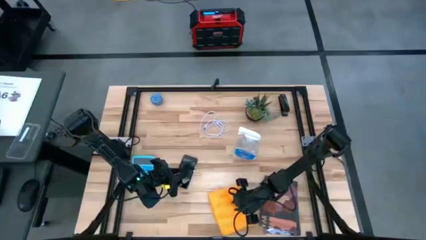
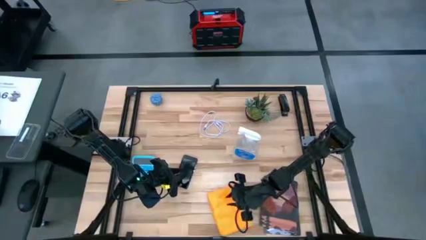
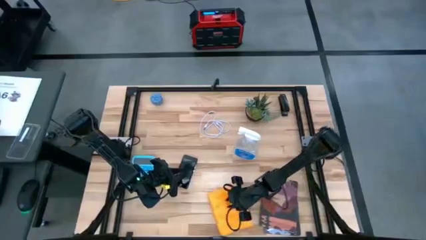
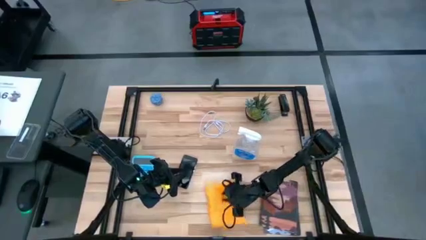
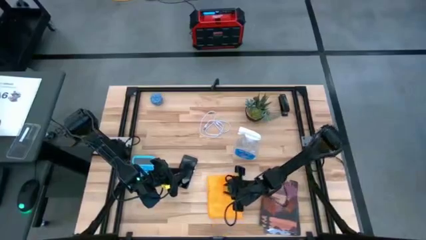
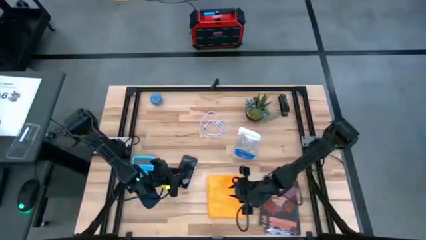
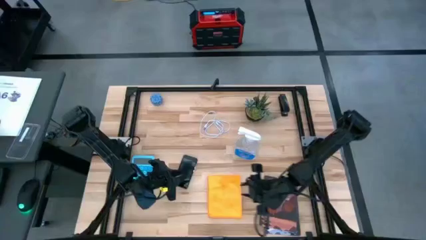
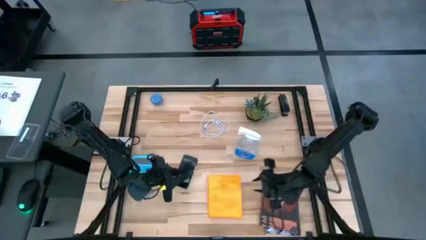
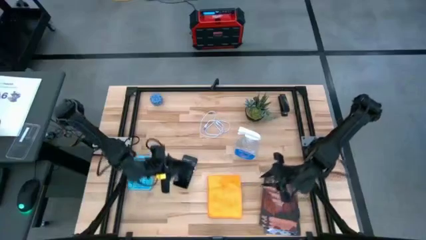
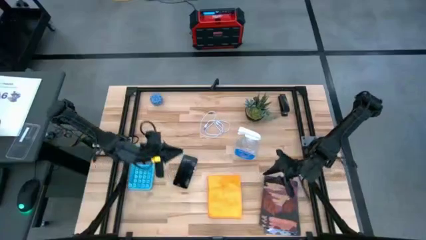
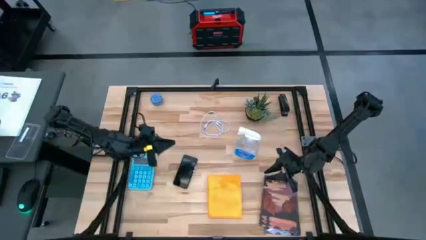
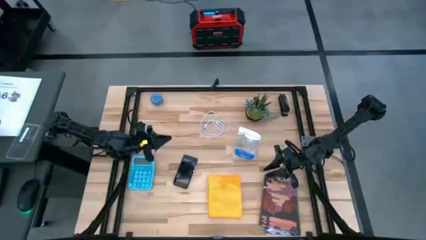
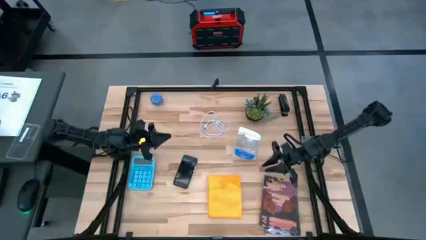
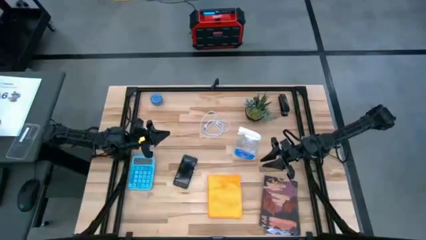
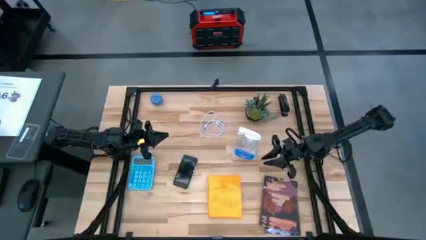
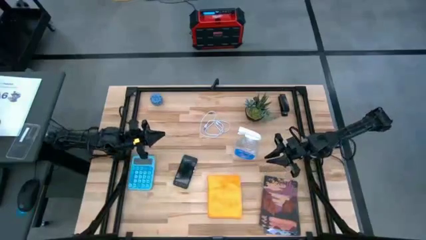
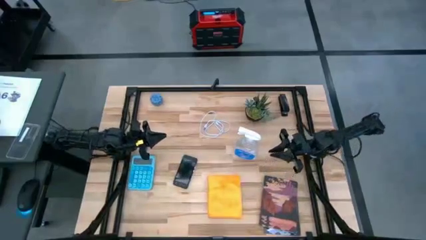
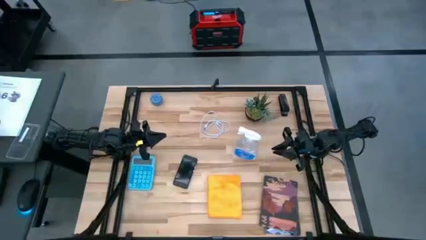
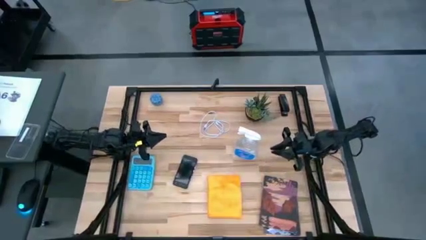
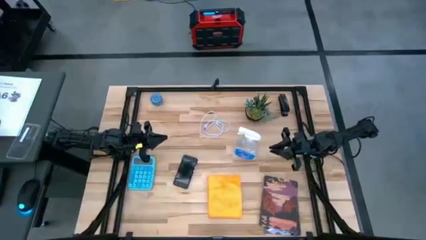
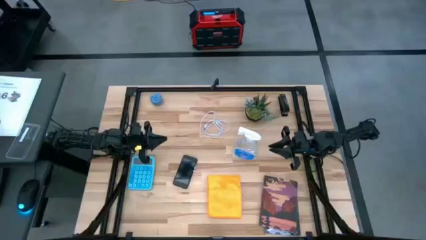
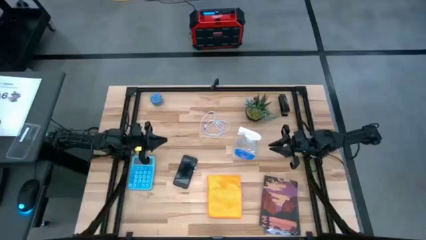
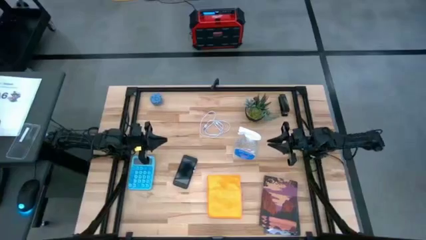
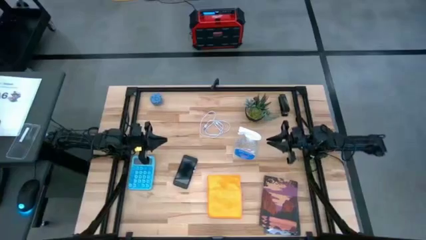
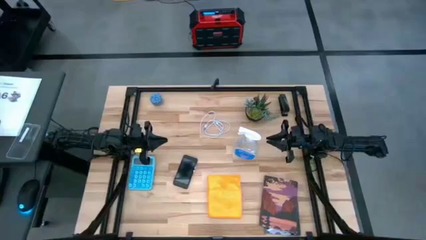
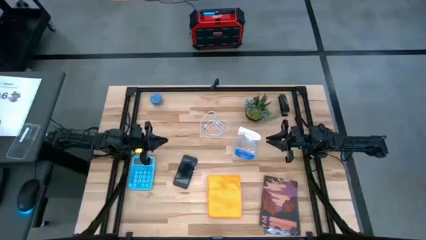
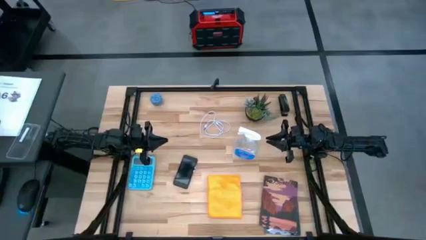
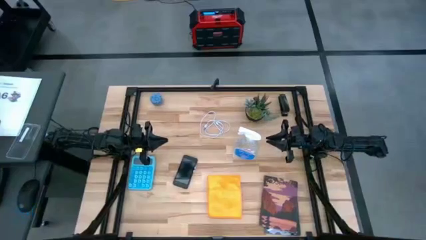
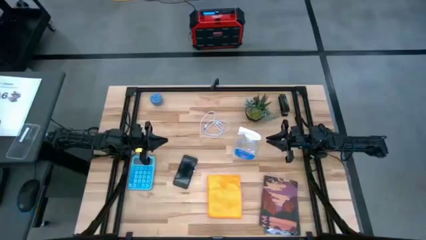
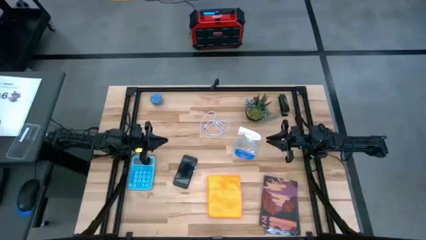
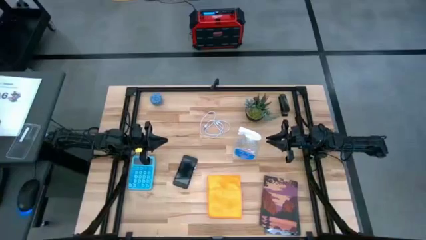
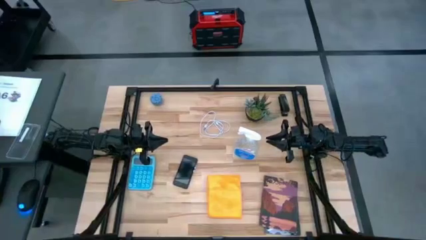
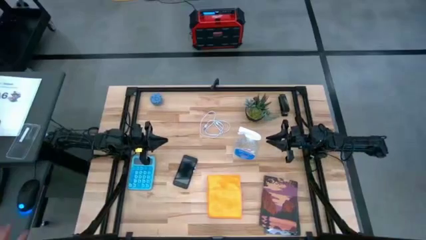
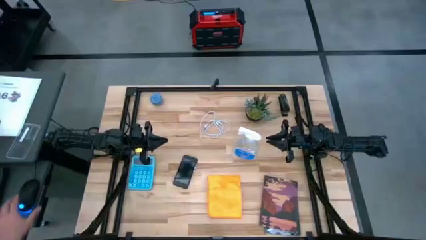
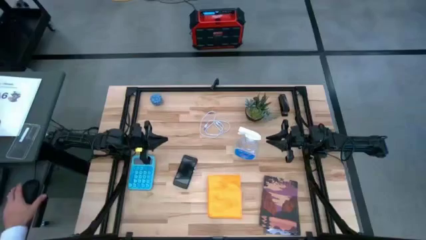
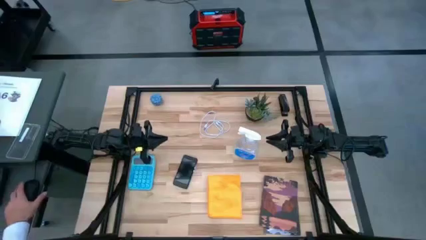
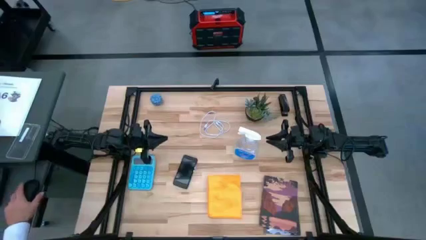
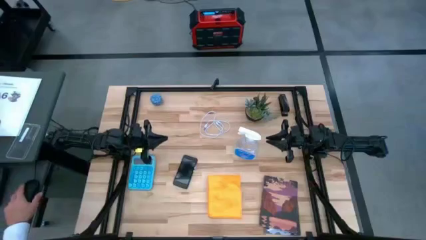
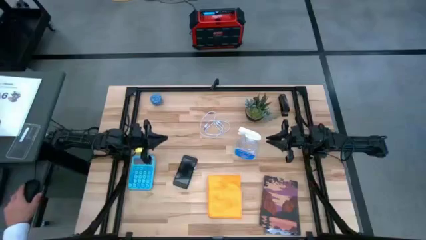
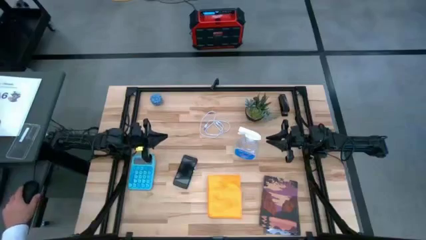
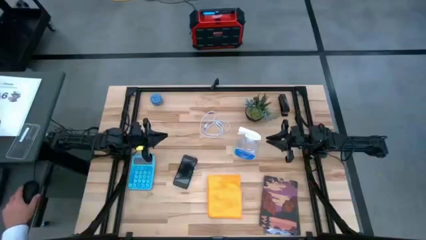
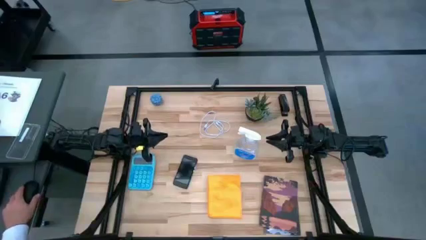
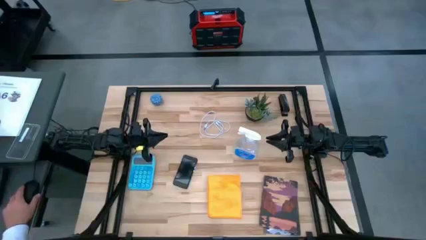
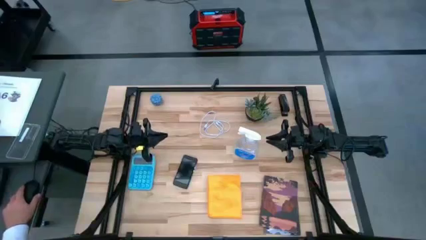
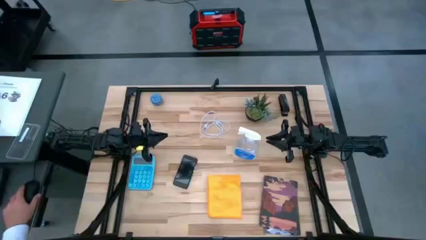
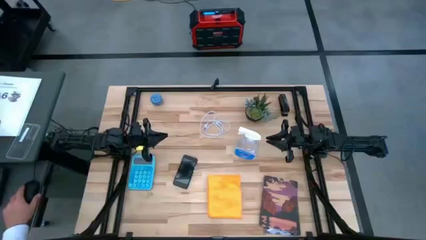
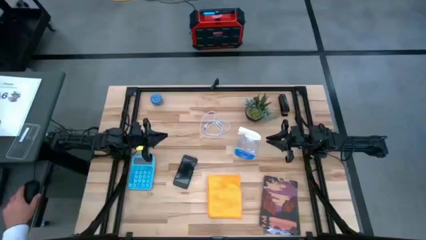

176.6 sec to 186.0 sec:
Task: Apply microfiber cloth
Return to Home Position

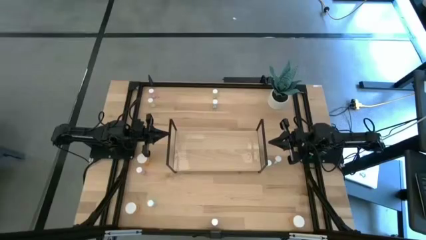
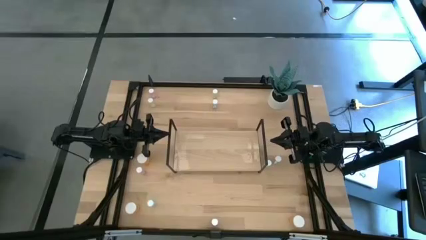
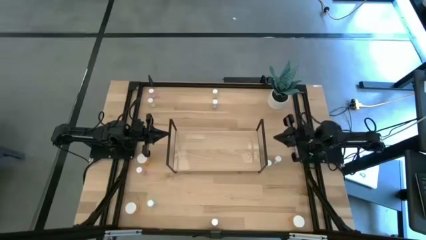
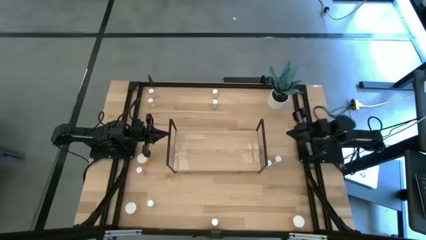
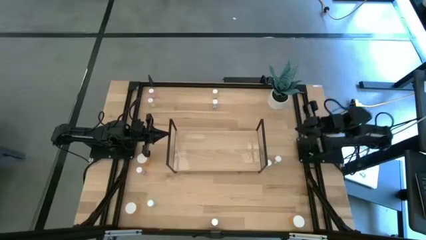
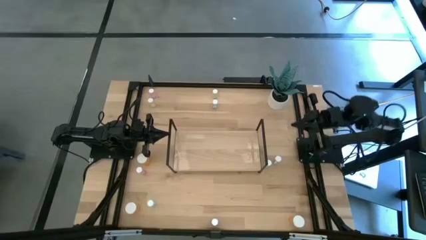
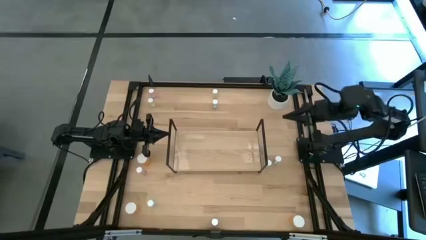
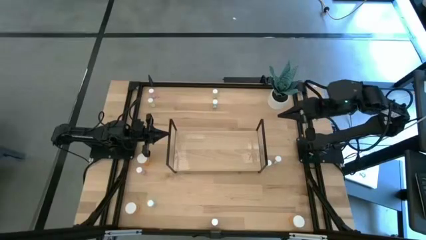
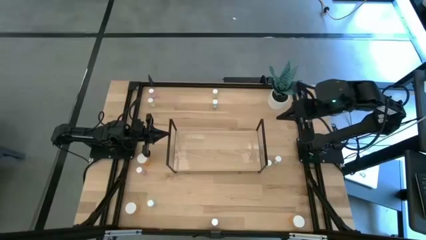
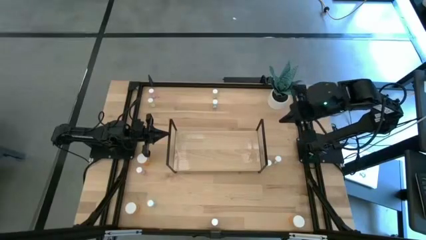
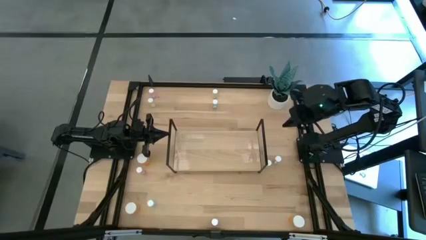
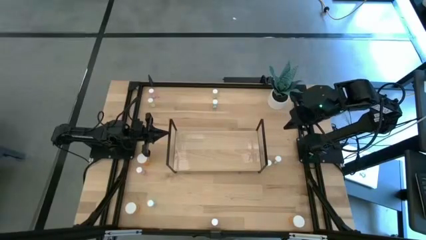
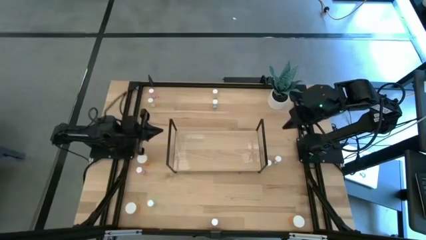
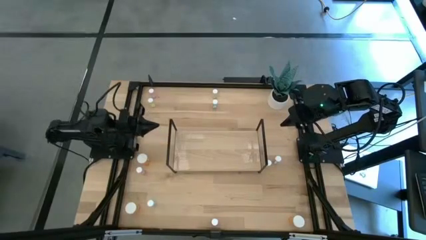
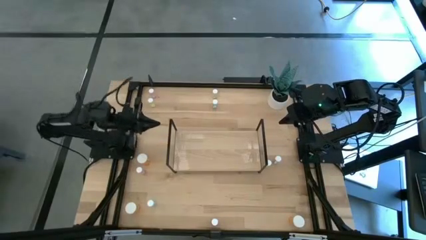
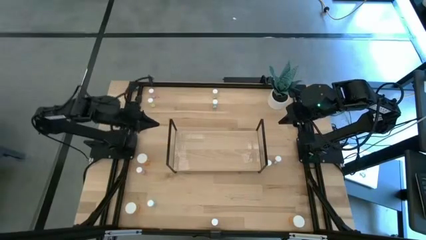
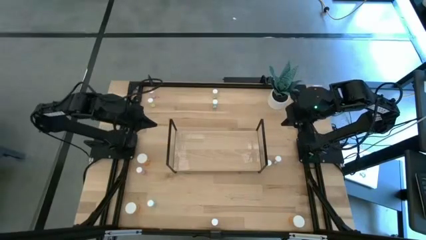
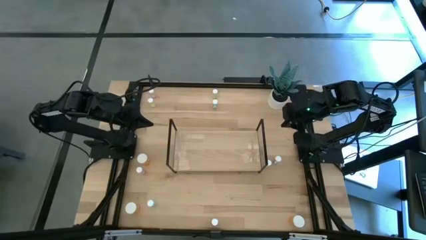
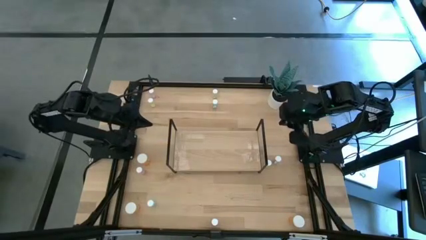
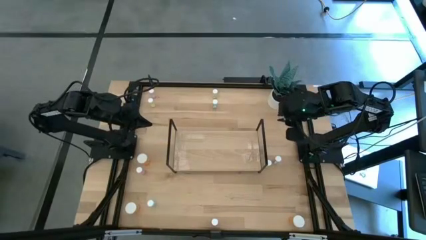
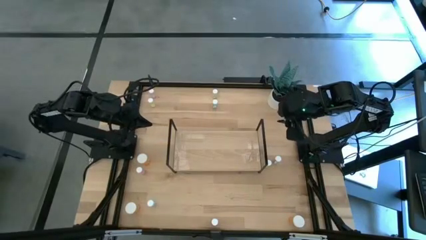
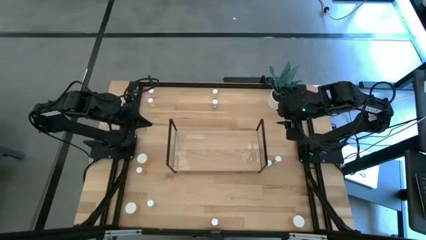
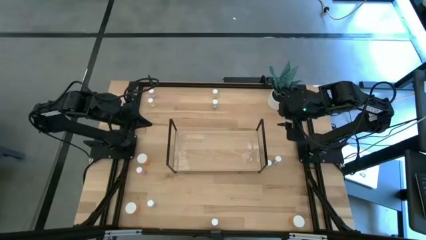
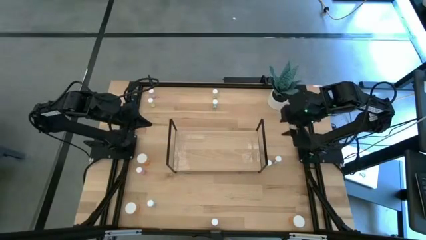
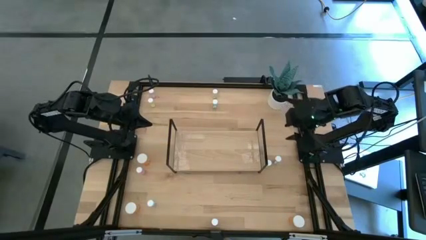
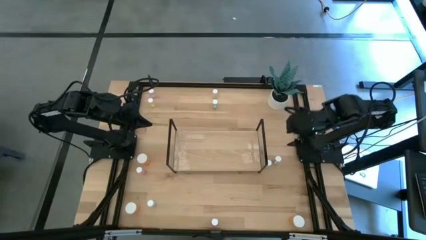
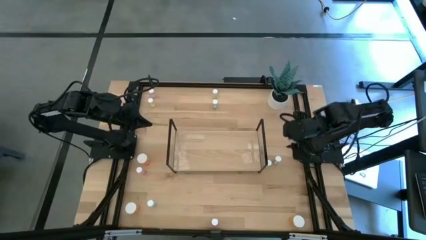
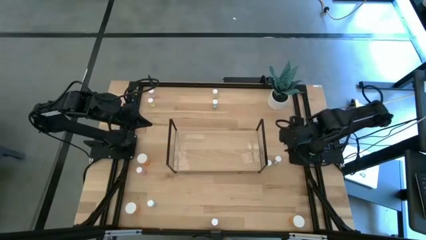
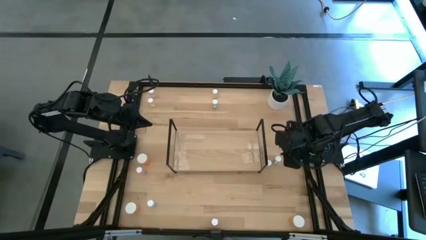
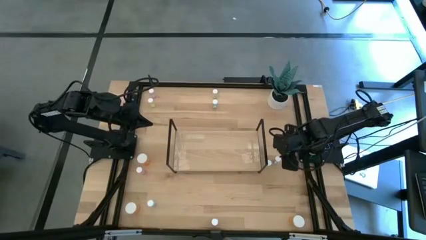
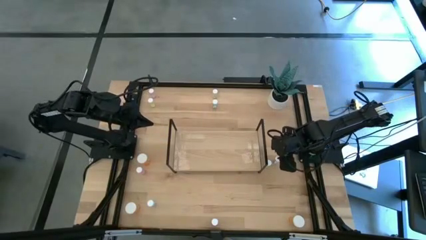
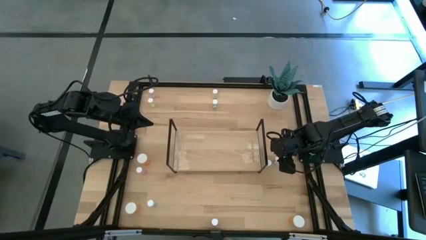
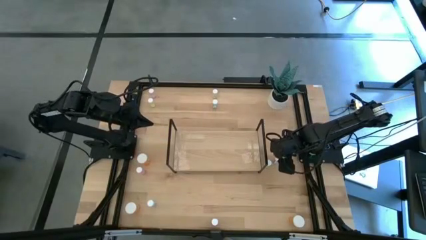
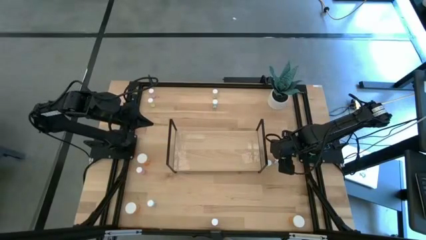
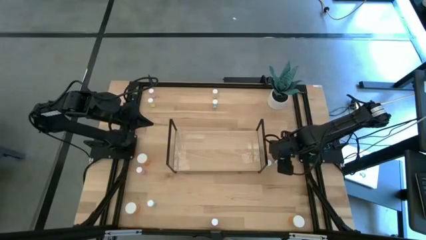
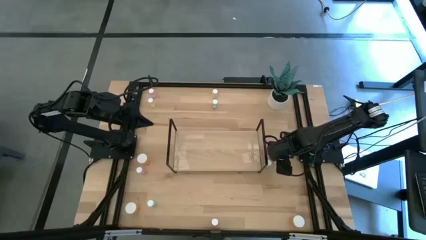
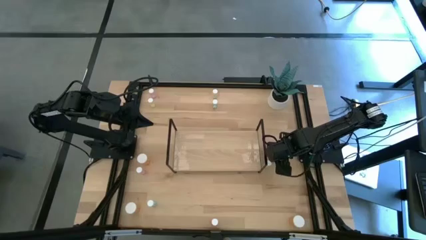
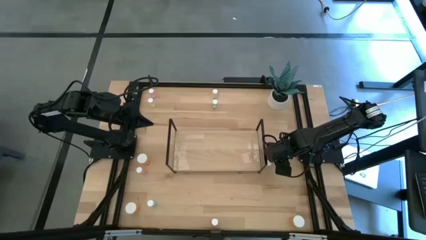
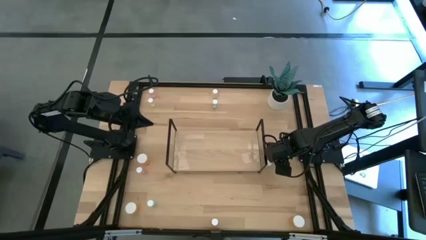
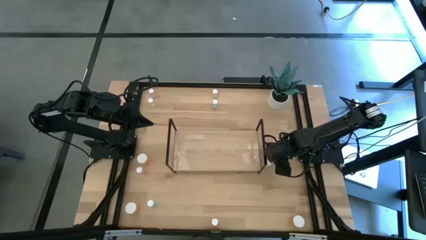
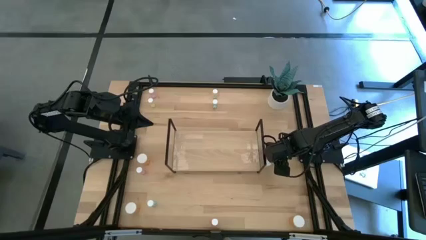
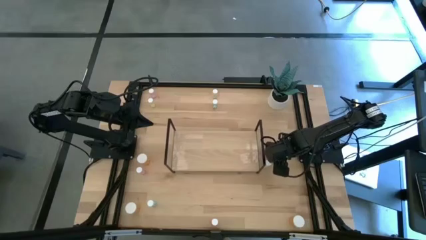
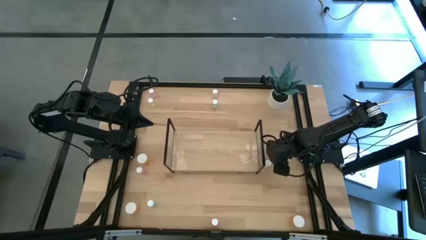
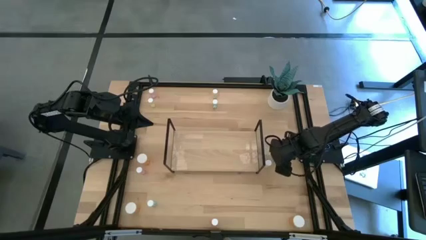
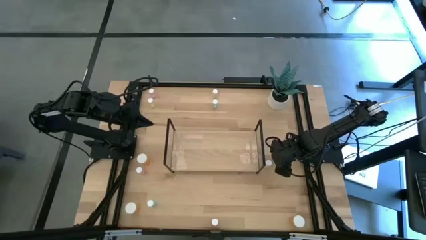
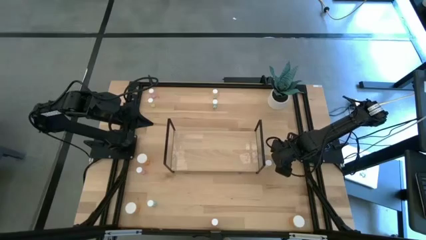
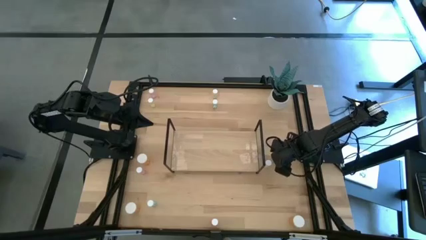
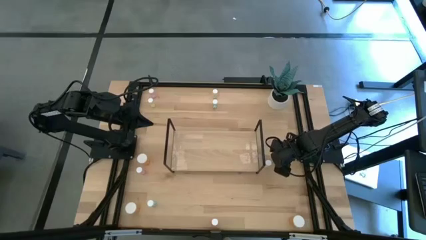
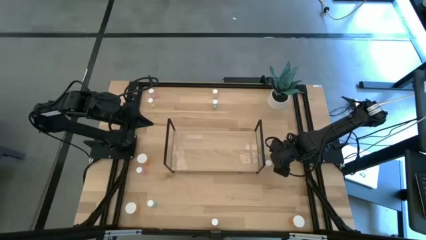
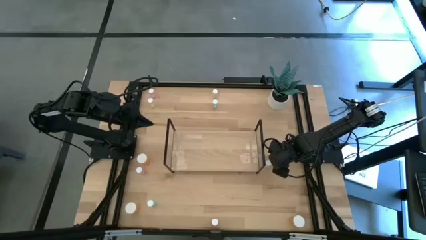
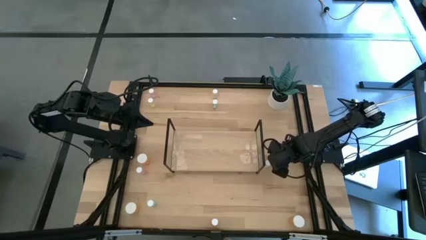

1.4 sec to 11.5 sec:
Task: Pick and place medicine bottles onto shelf by color
Put the middle right blue pill bottle on the shelf
